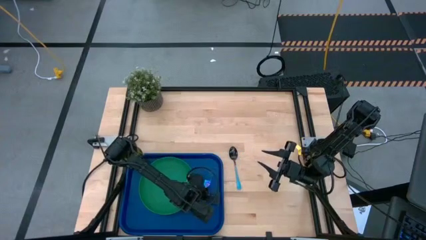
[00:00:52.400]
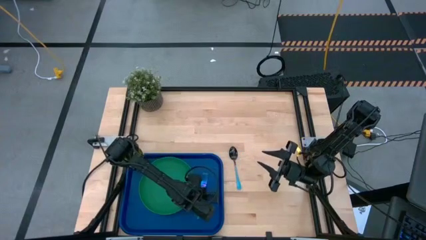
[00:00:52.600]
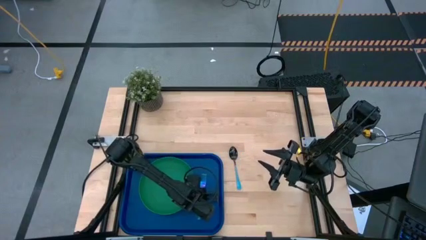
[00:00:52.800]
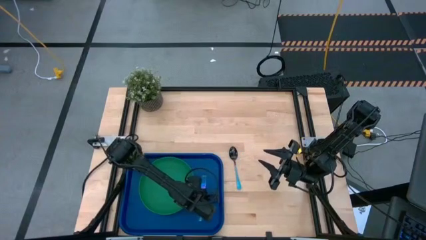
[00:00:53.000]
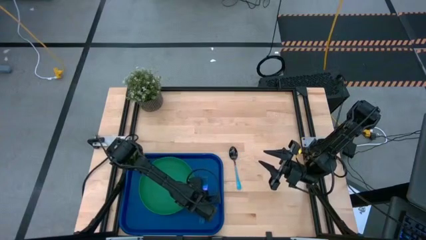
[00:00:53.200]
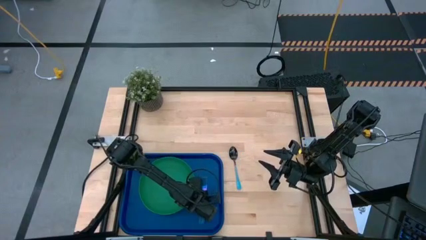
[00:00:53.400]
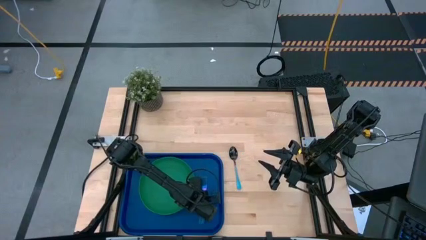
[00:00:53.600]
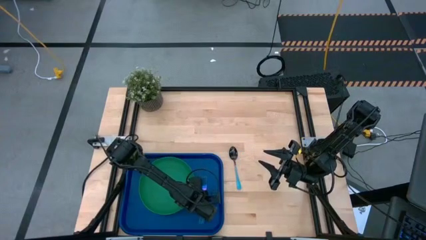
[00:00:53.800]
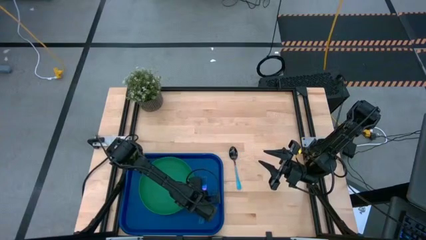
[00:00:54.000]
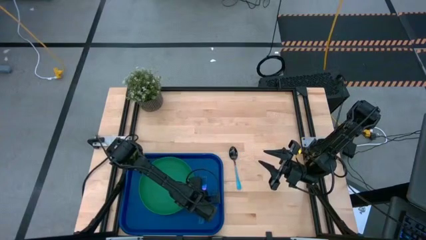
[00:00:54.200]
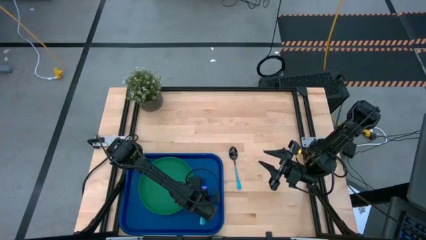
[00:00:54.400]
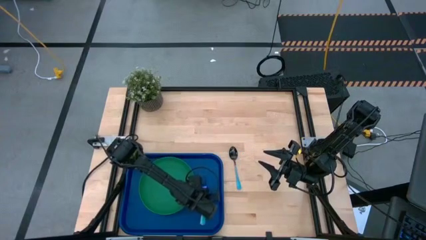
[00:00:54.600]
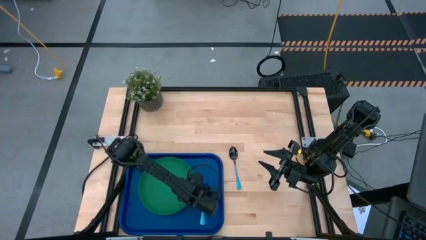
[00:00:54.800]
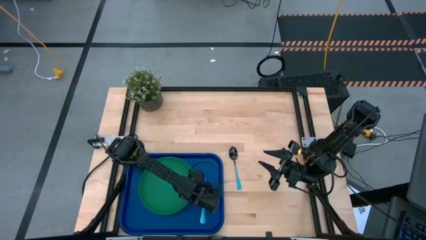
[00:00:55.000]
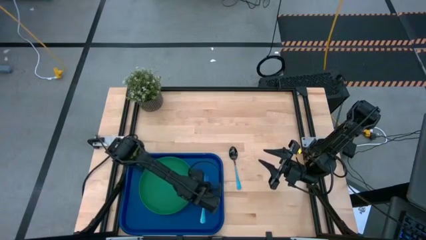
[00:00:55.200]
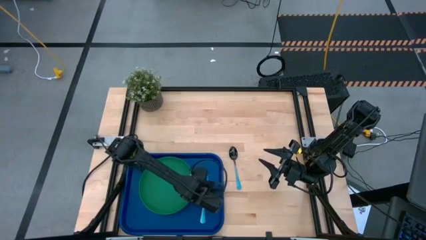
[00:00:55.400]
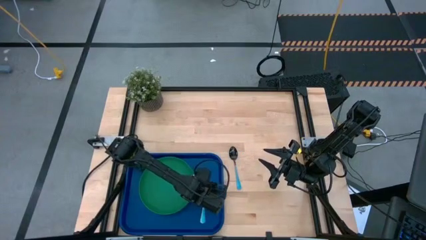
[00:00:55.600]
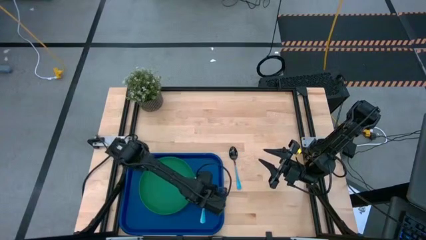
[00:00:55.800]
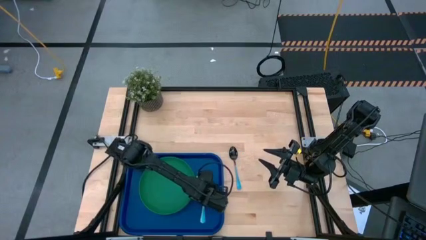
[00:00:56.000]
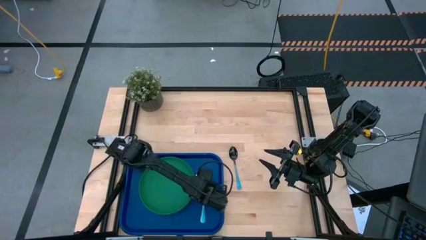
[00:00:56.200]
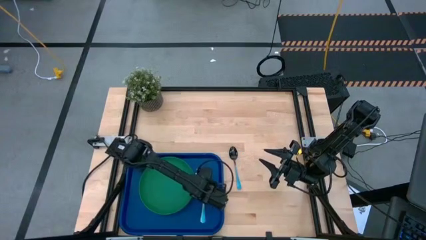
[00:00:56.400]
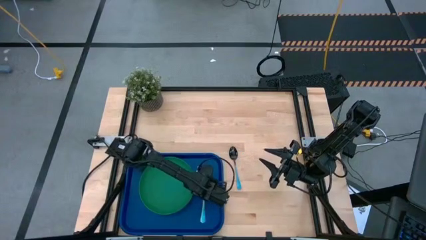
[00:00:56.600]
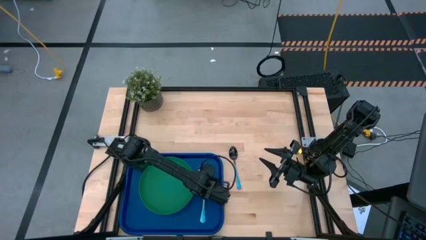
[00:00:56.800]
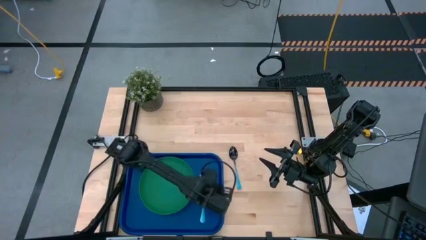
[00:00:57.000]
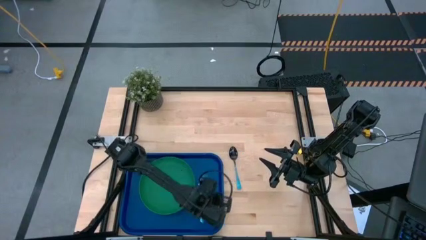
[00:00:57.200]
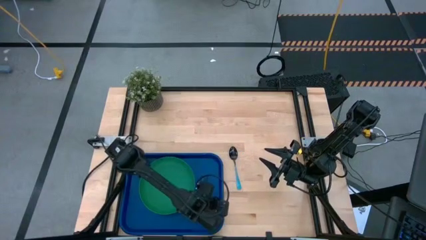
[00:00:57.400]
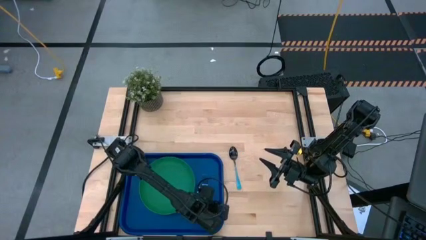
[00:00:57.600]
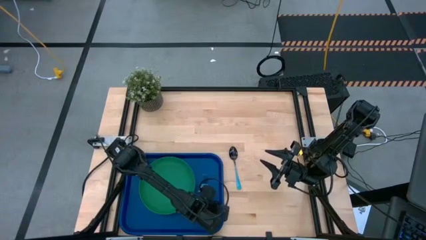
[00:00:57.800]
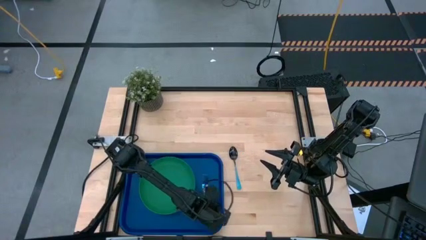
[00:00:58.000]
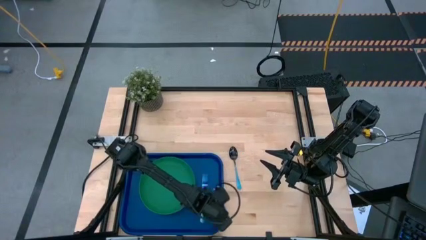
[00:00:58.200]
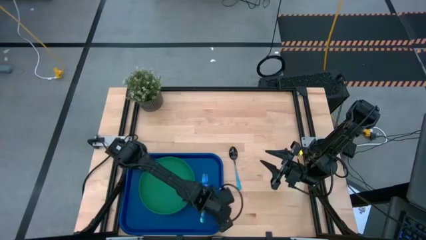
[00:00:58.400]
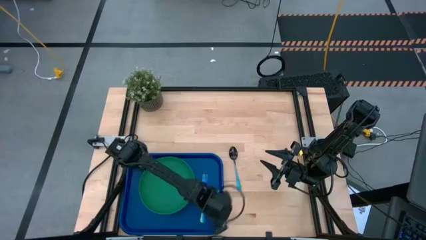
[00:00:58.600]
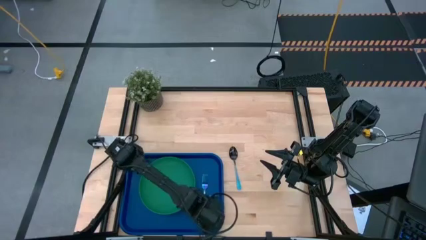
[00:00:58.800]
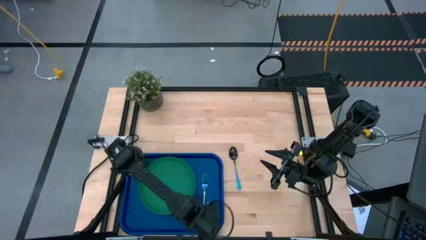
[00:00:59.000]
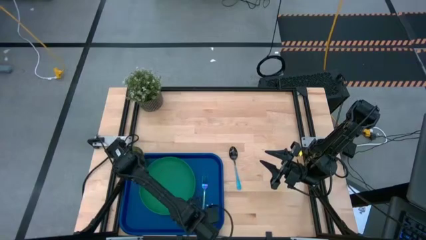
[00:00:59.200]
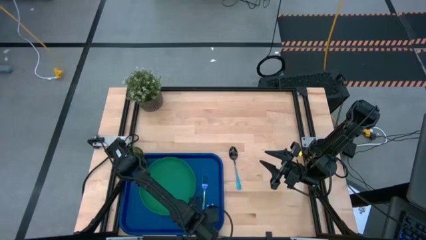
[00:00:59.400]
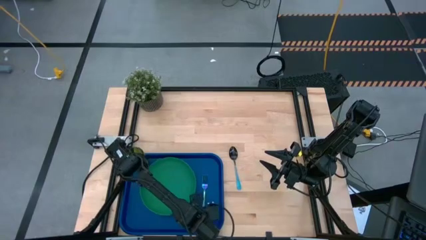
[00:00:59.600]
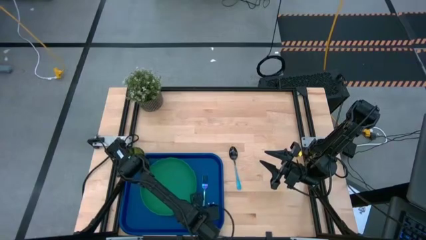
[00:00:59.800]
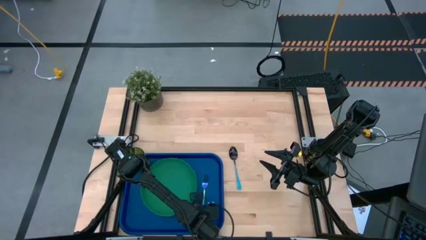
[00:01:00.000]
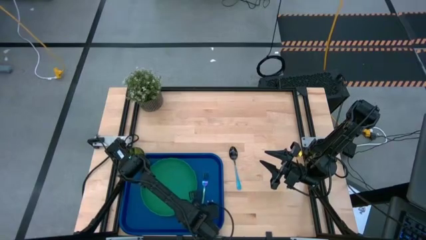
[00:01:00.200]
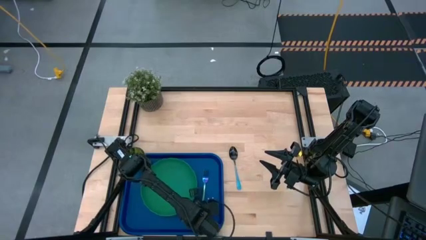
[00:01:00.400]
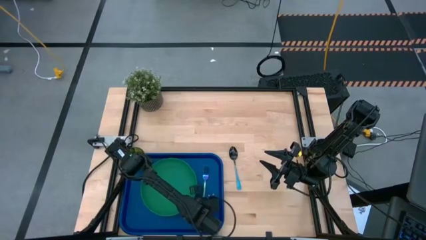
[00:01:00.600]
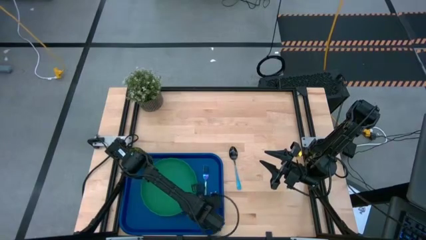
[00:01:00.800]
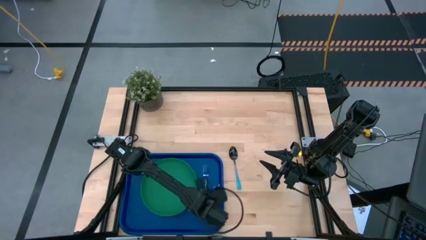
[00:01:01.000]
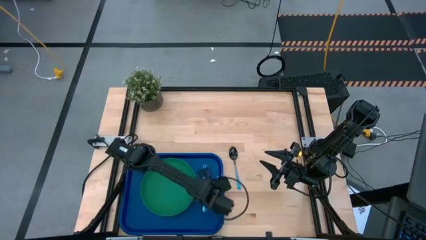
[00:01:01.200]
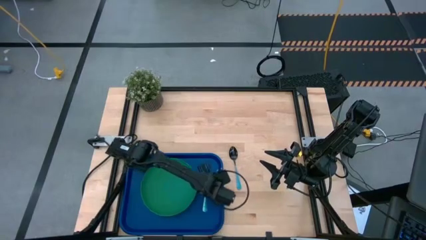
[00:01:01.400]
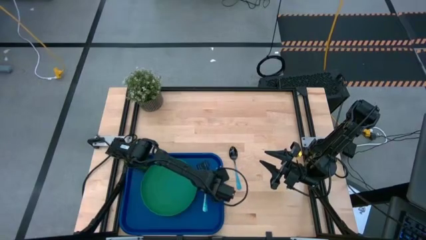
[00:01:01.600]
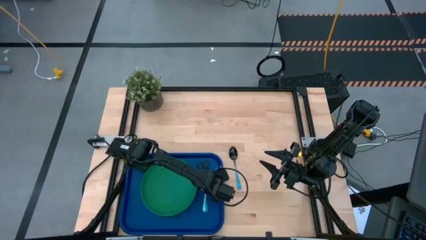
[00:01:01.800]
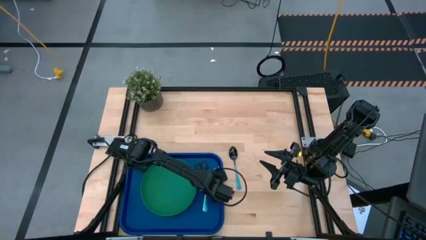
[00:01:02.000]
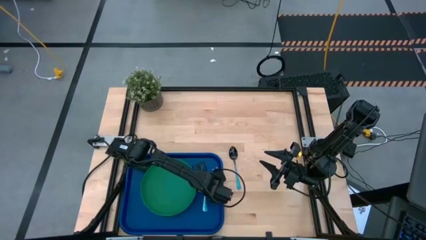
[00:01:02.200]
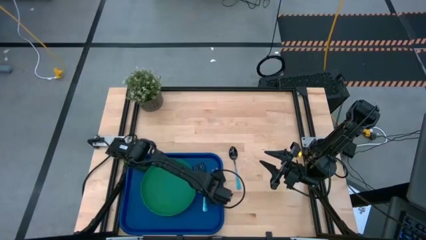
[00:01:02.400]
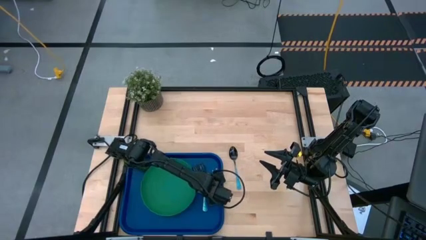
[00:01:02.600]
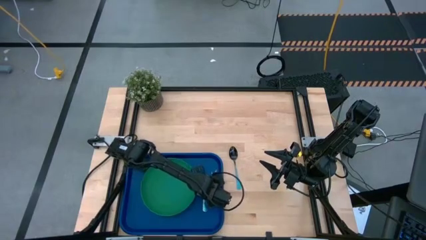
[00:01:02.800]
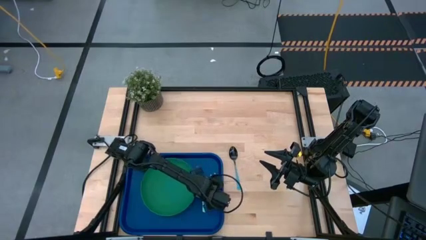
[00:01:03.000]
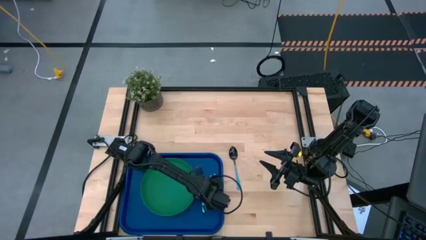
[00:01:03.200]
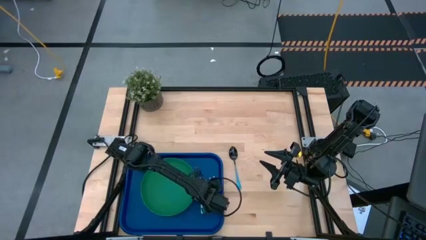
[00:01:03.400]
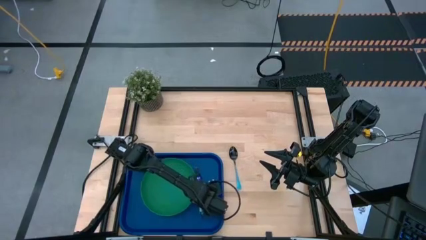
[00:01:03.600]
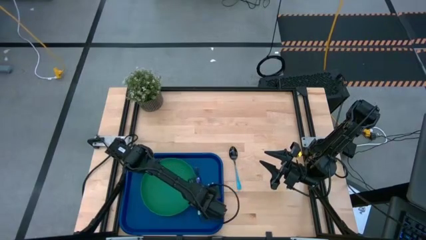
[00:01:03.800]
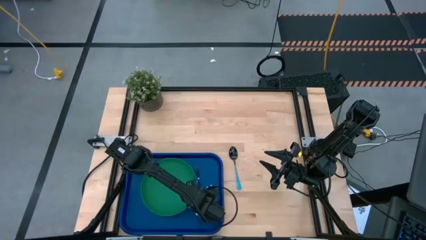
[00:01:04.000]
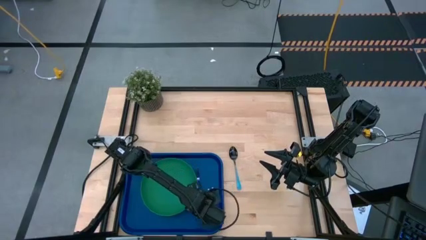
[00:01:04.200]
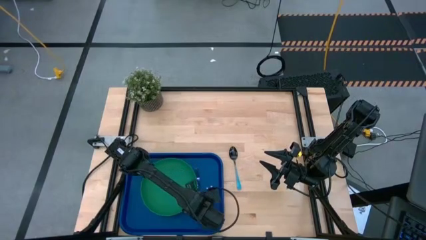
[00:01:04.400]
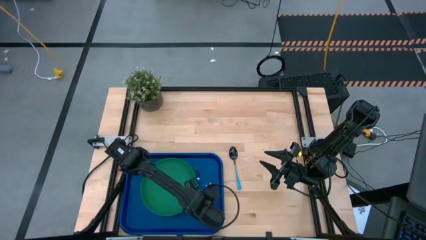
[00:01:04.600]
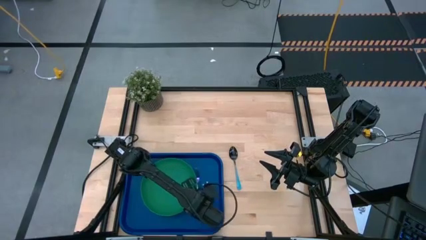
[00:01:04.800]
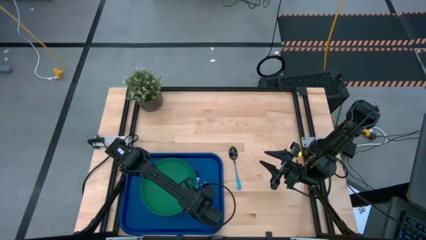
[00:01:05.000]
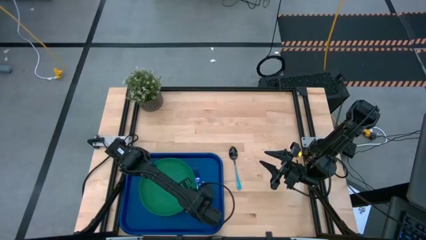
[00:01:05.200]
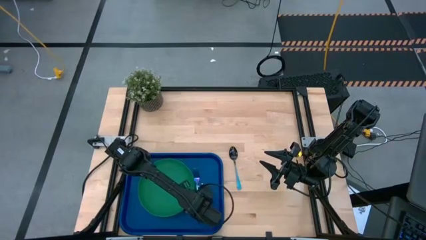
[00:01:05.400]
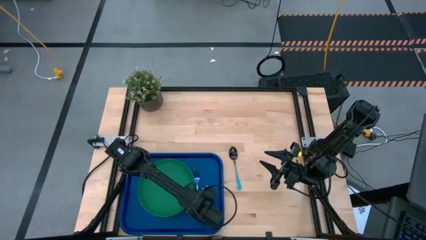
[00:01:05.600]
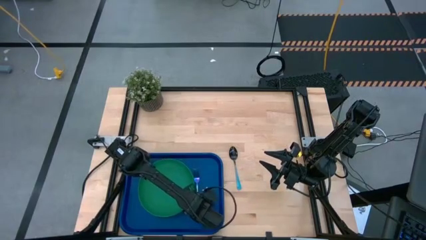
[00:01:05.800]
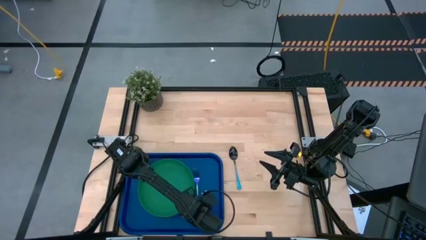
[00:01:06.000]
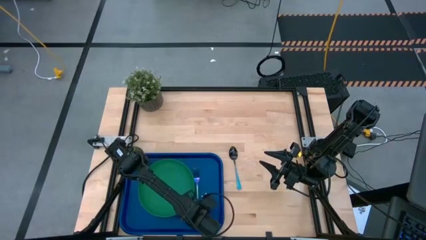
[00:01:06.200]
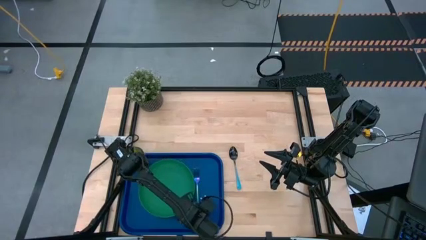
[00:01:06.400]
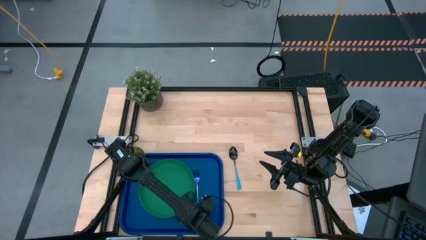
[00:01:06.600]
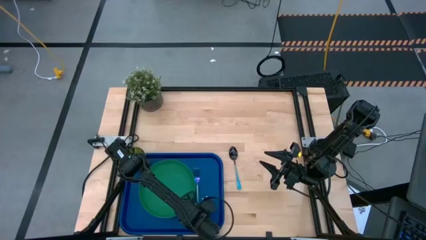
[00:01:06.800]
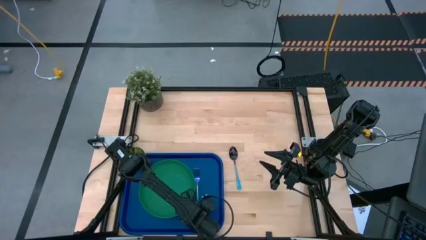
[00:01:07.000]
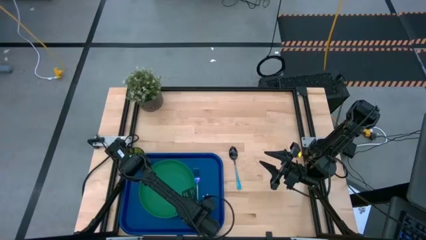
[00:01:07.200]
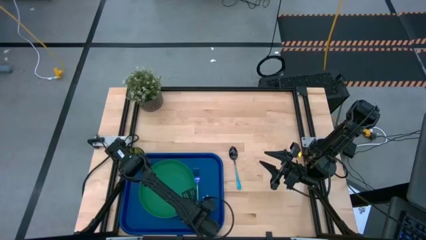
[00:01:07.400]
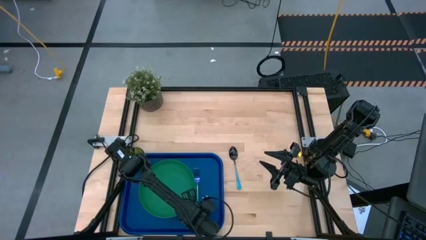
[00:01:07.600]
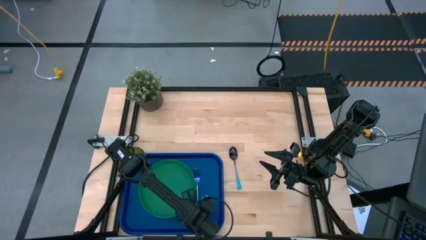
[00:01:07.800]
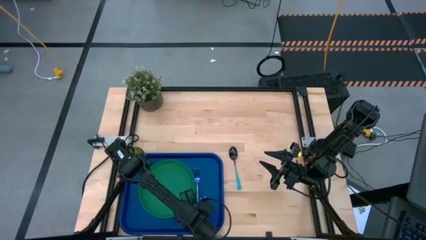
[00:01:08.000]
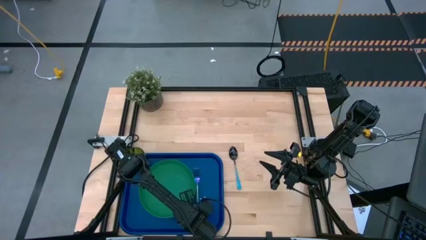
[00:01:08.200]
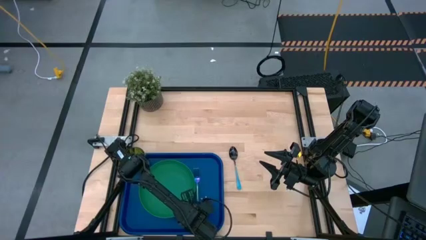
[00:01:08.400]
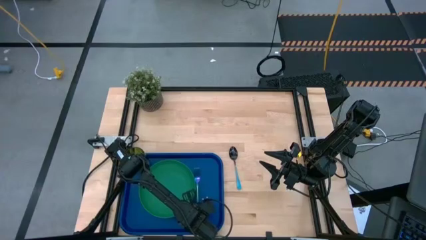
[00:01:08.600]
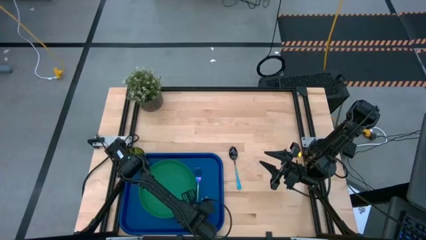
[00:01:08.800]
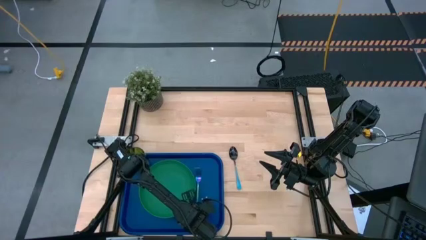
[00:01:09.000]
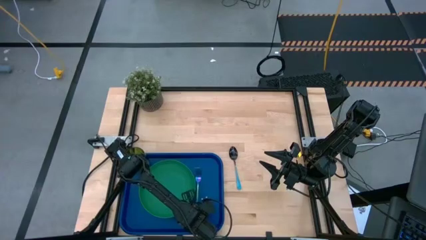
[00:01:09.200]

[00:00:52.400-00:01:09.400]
Task: Pick and place plate/cup/fork/spoon on tray
Put the blue fork to the right of the green plate on the dark blue tray
